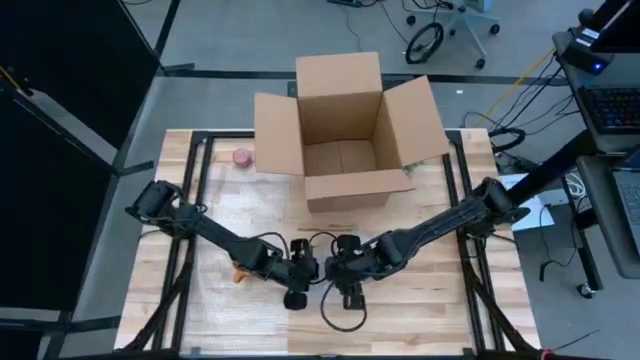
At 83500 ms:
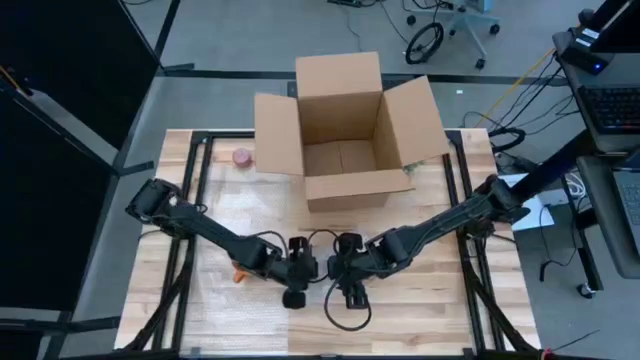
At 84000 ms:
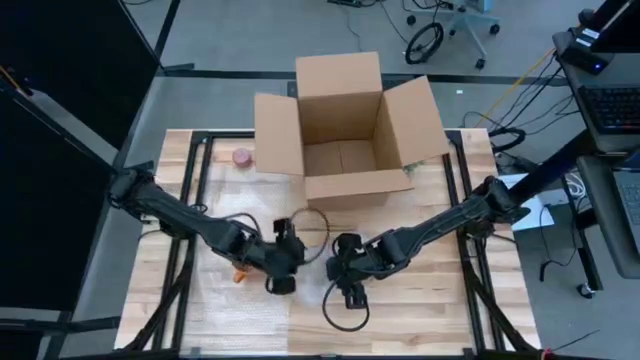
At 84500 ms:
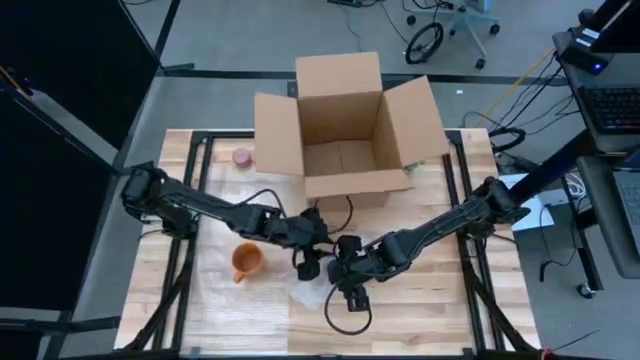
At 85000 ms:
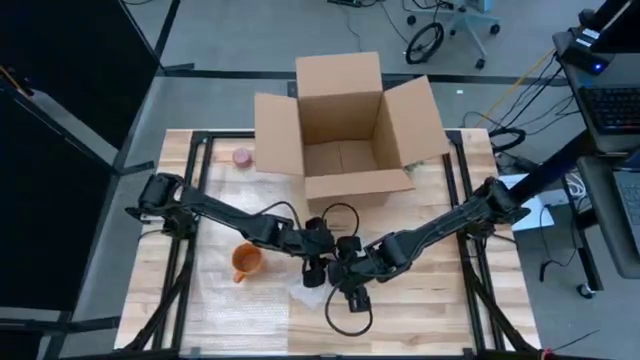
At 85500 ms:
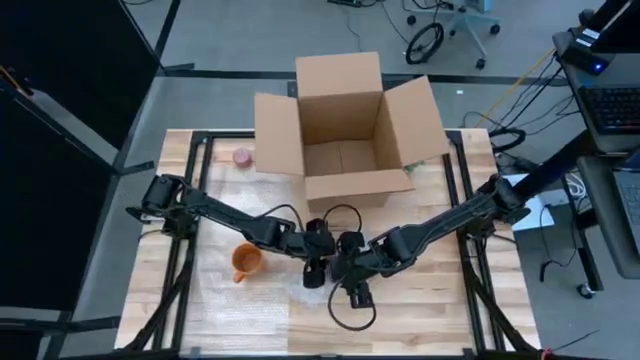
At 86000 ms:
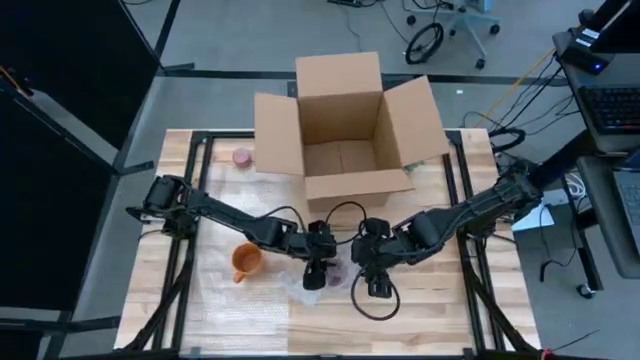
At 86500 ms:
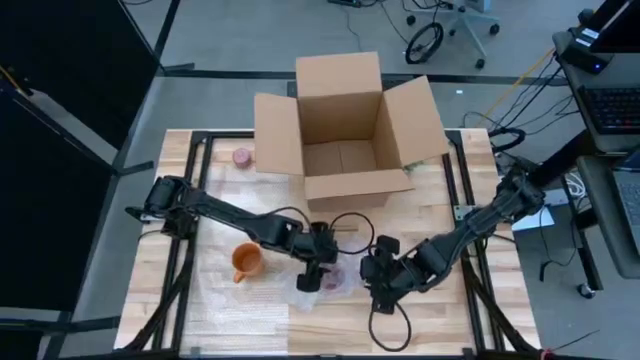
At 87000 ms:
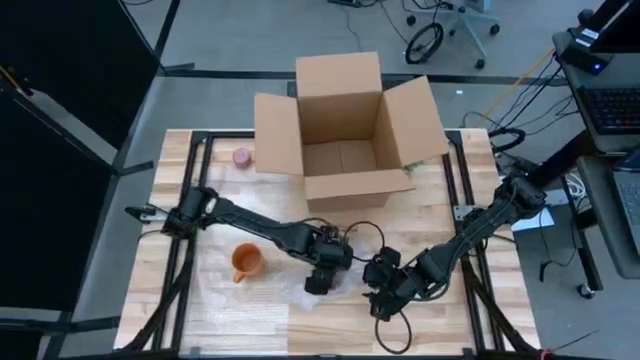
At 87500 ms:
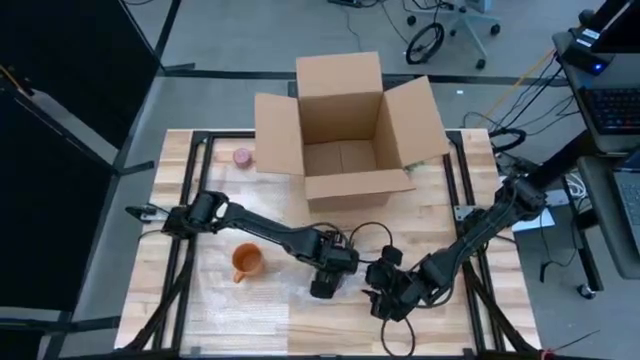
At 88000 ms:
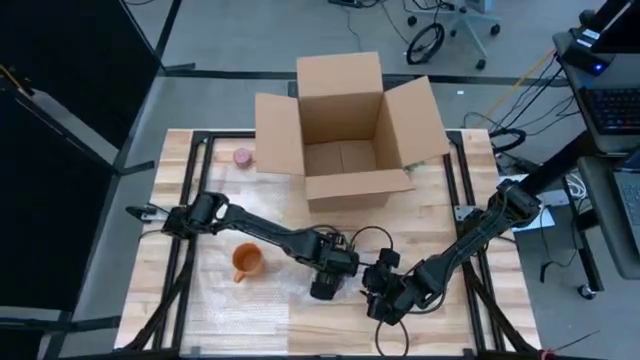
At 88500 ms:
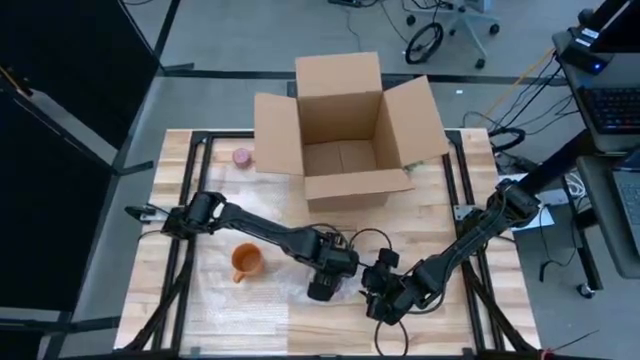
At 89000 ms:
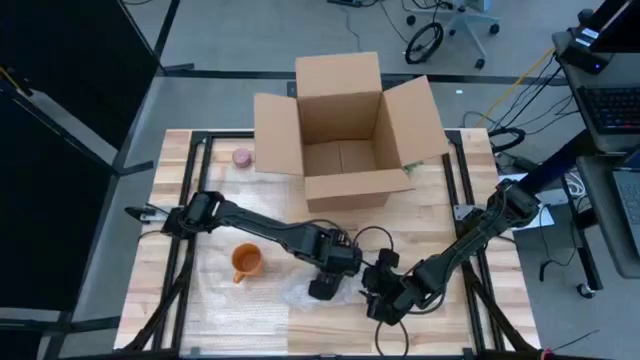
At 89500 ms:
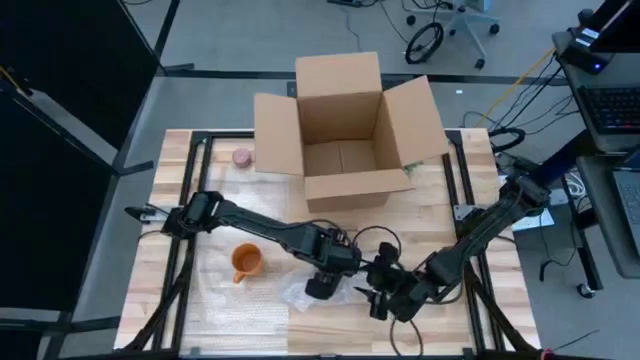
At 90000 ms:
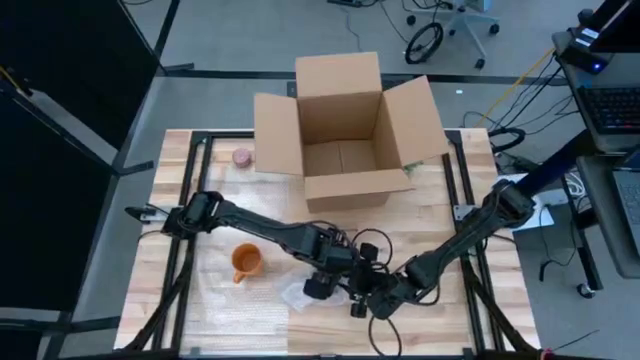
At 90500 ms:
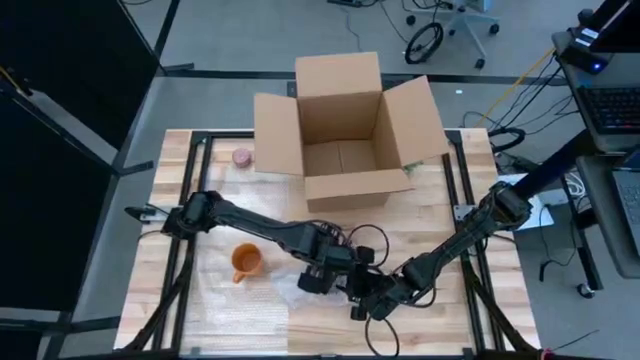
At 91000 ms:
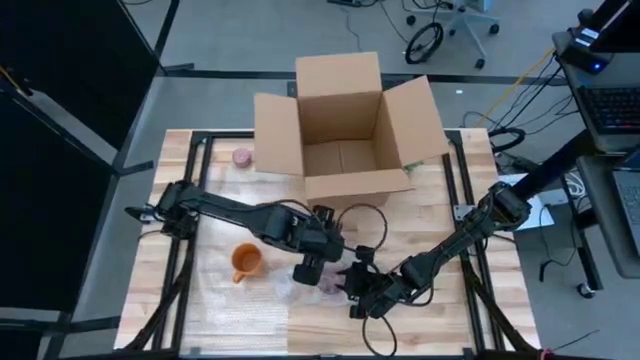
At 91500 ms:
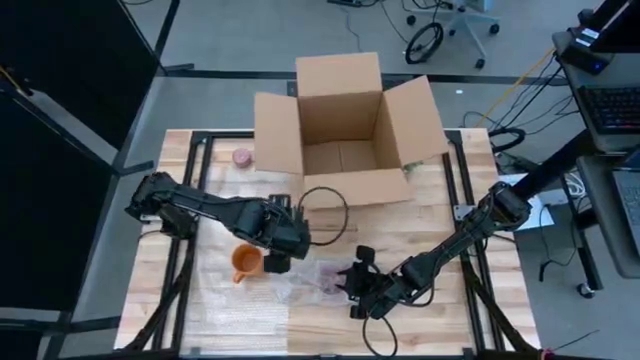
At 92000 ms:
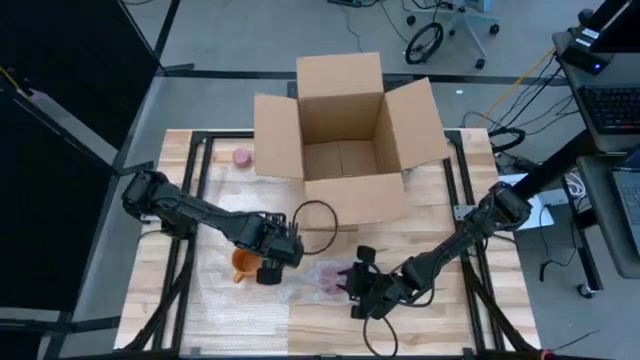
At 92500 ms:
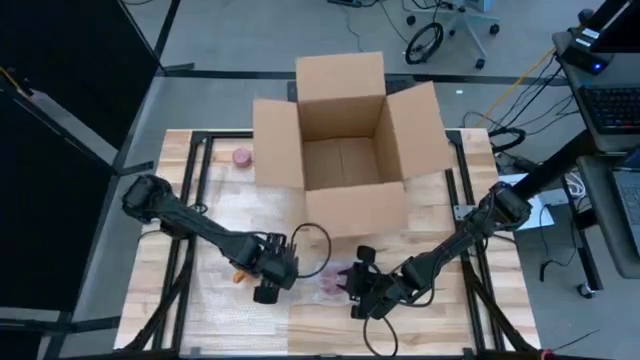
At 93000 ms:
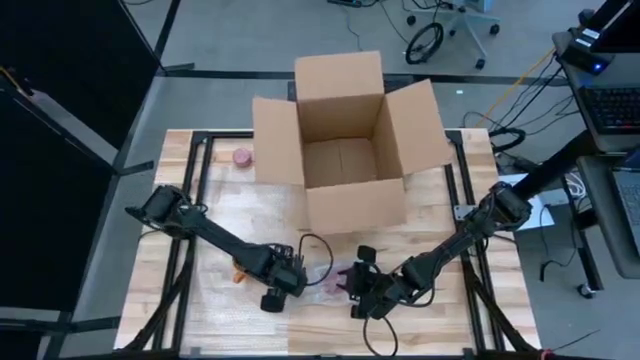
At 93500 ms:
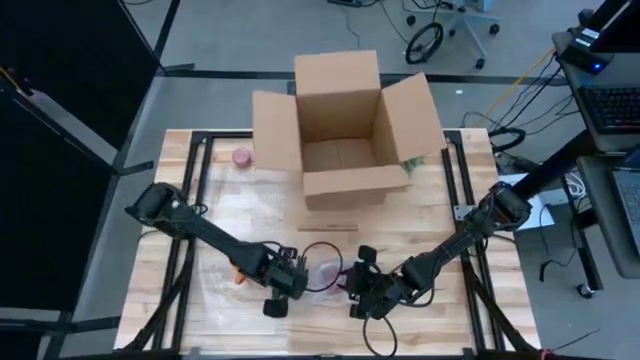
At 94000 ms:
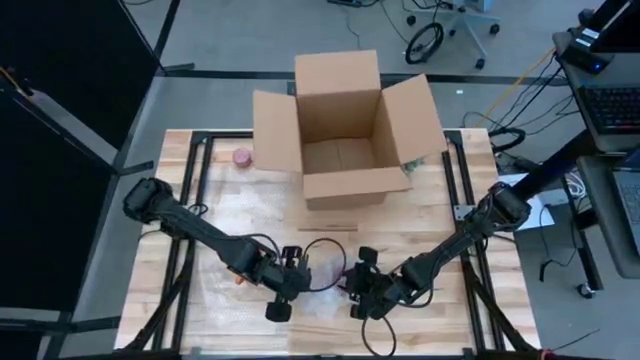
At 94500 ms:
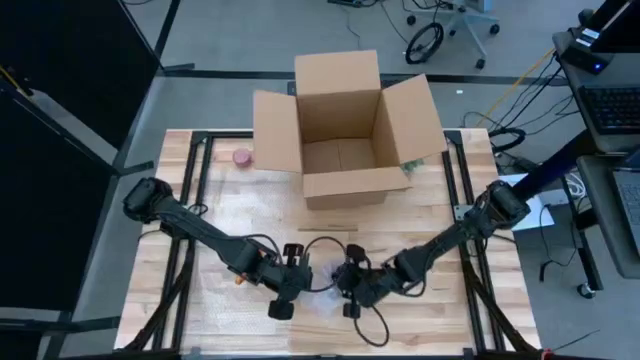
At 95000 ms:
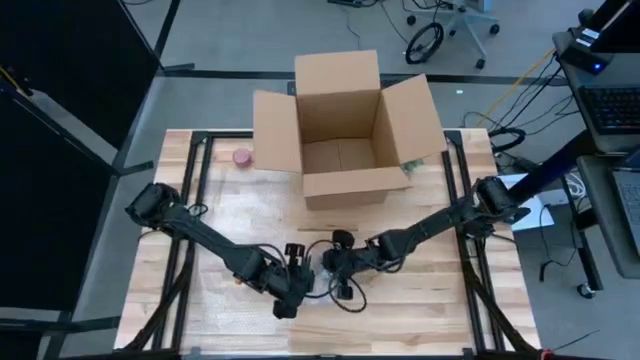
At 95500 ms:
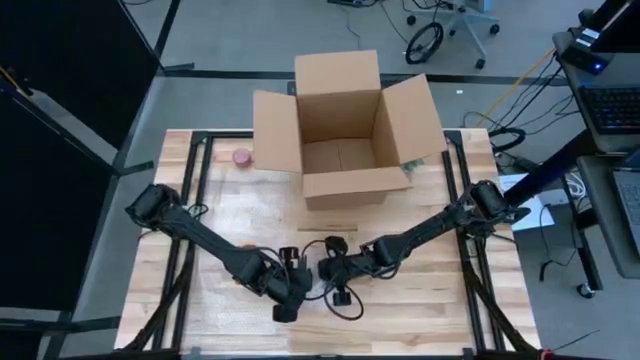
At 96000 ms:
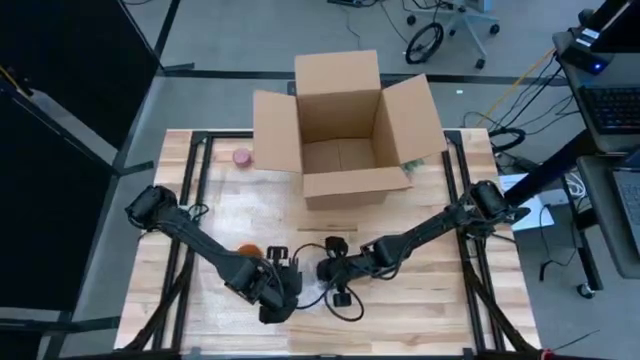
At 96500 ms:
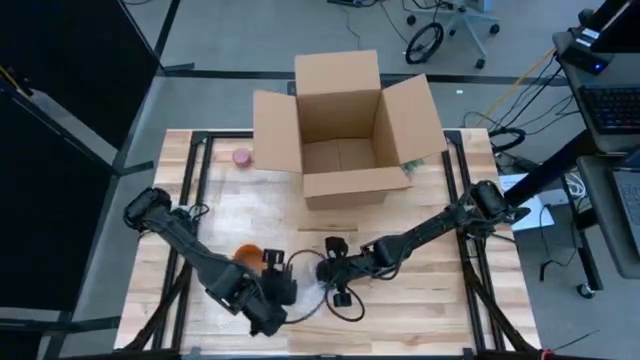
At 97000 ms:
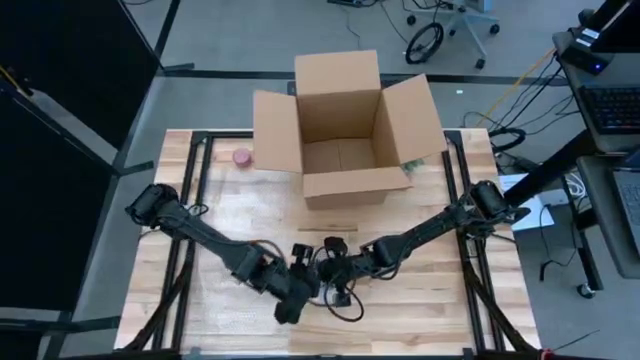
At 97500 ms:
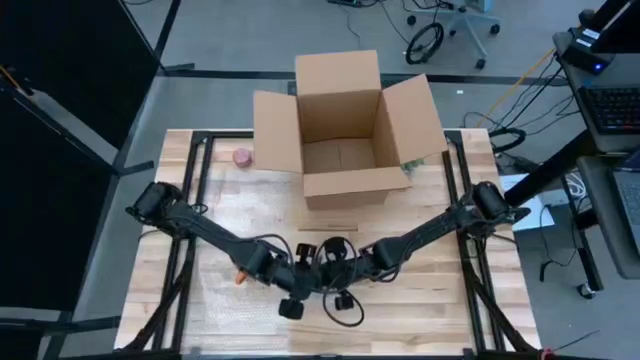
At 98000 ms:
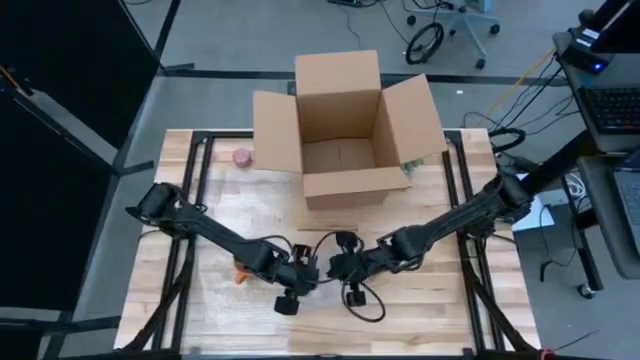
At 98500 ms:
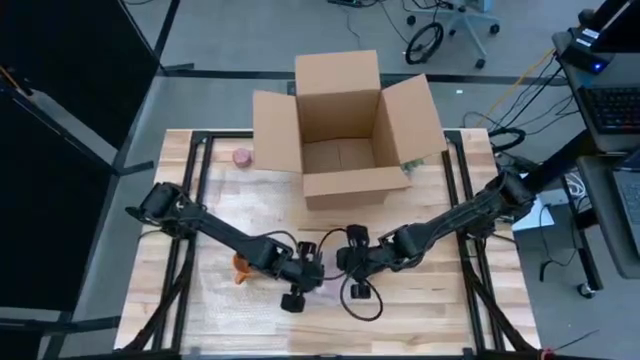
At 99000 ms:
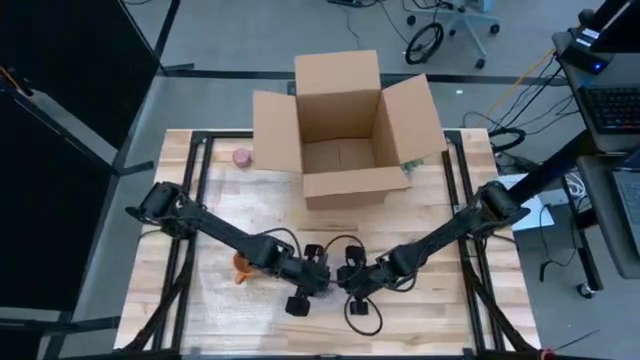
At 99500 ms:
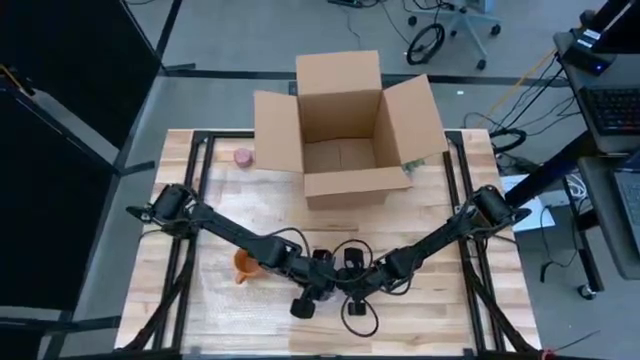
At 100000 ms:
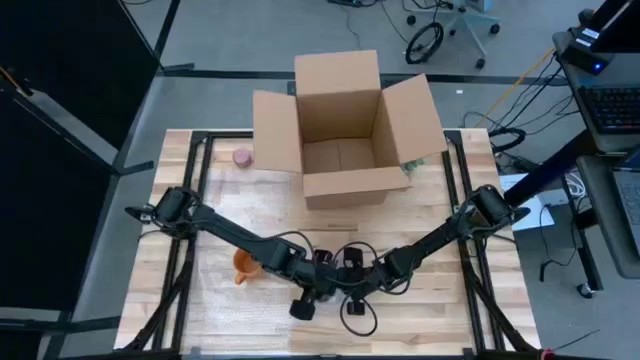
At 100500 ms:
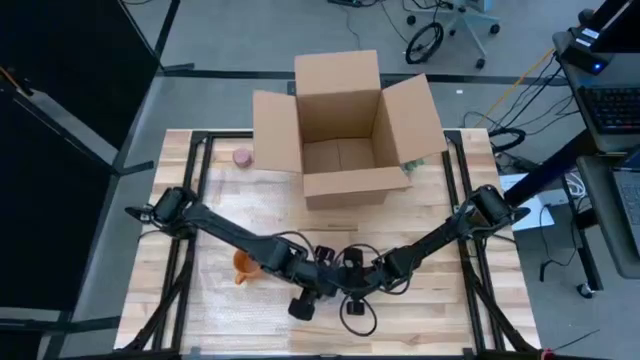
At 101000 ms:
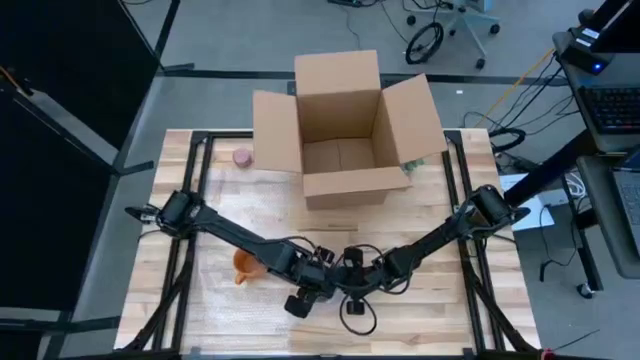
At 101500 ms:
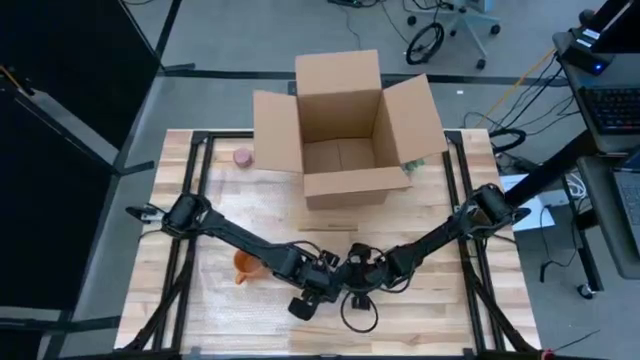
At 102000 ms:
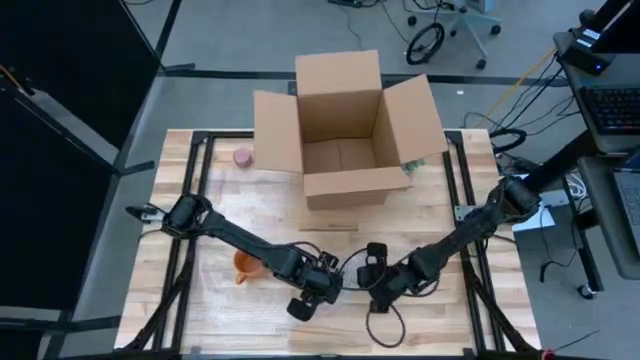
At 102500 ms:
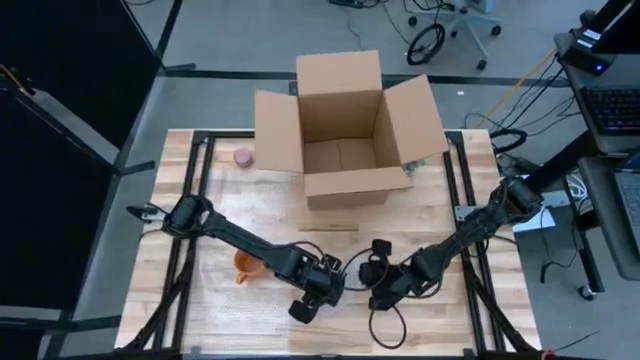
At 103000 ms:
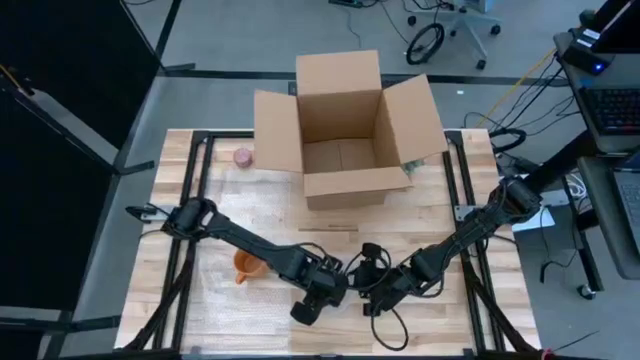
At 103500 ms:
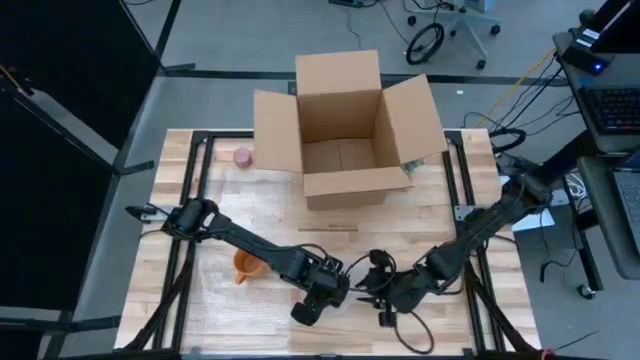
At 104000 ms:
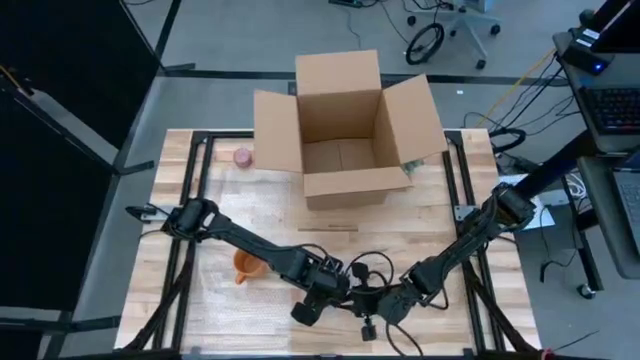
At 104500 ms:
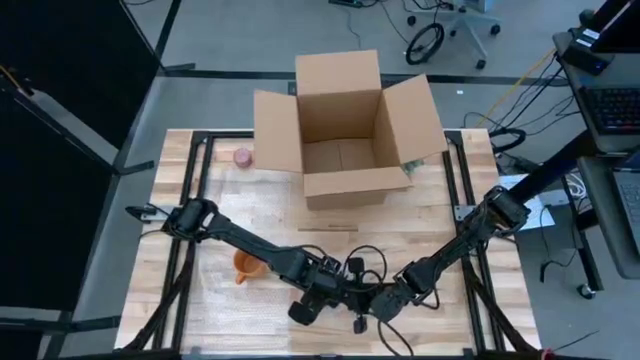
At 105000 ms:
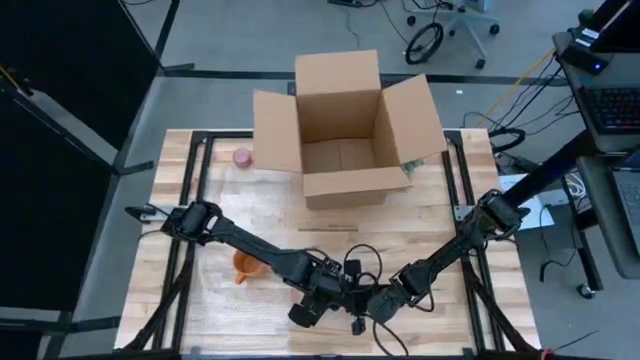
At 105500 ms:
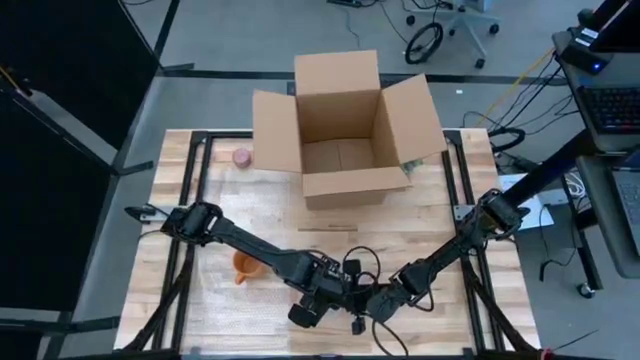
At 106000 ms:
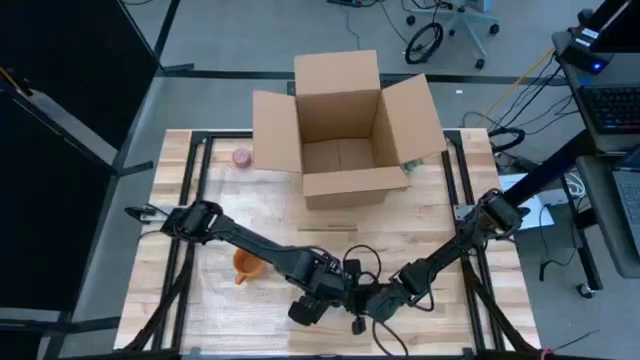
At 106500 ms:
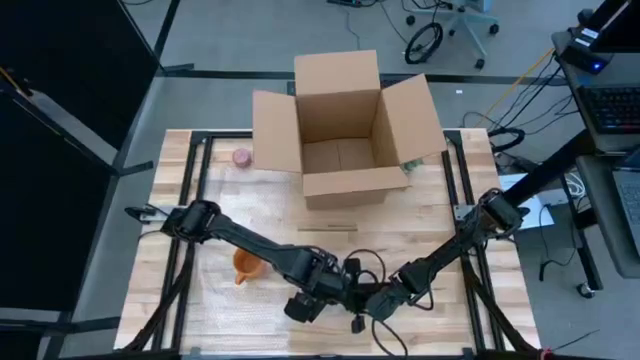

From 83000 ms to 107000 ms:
Task: wrap mug
Wrap the pink cup with the bubble wrap
